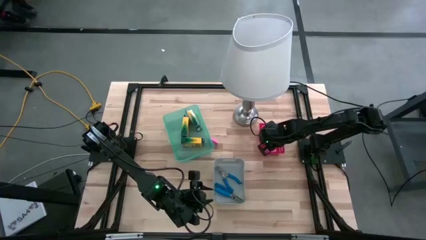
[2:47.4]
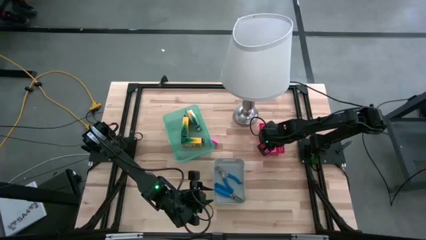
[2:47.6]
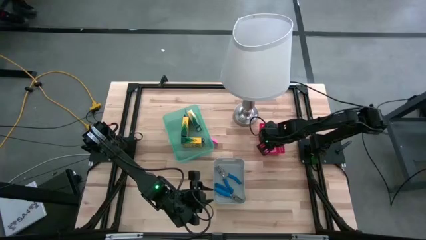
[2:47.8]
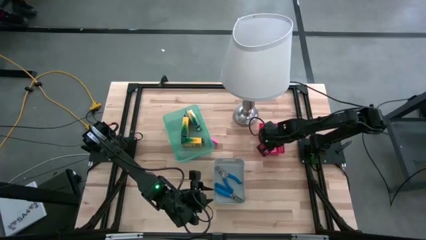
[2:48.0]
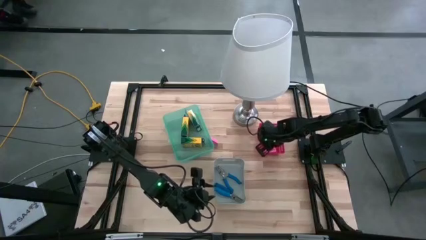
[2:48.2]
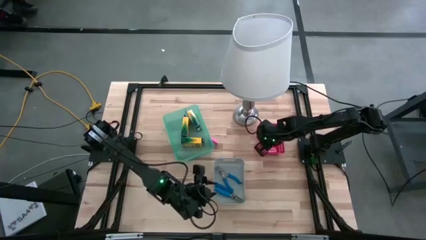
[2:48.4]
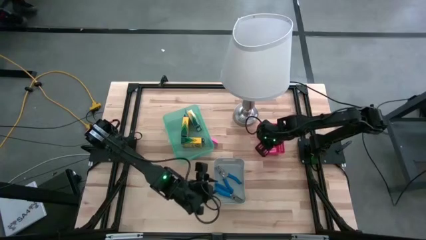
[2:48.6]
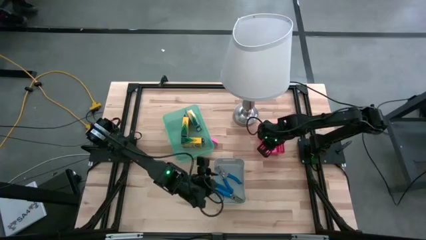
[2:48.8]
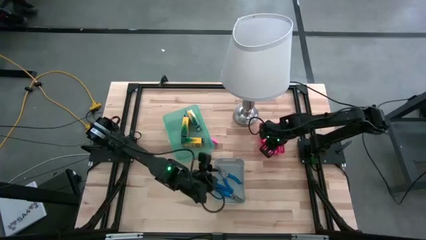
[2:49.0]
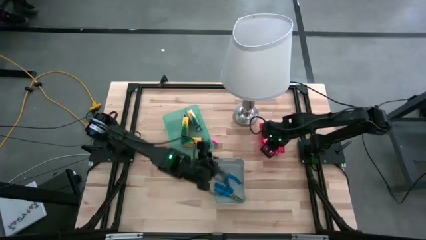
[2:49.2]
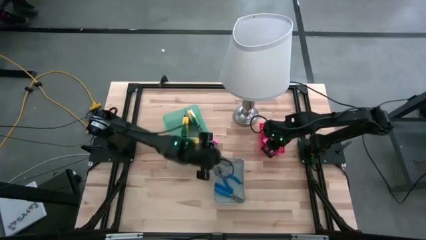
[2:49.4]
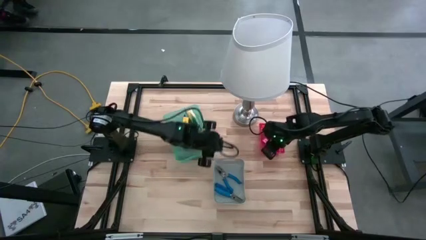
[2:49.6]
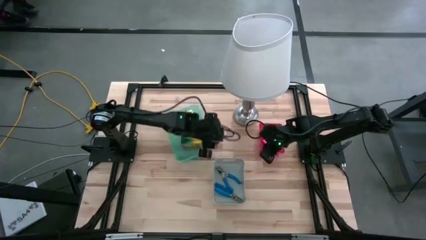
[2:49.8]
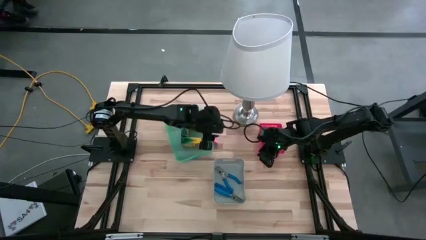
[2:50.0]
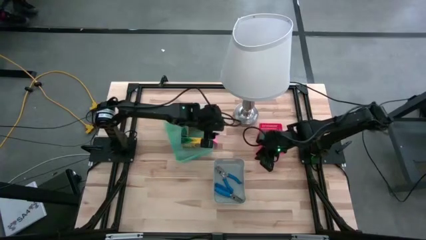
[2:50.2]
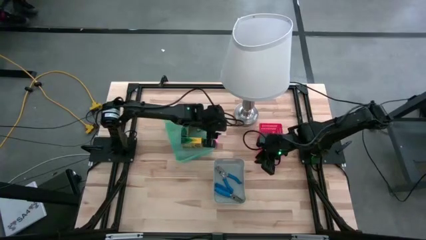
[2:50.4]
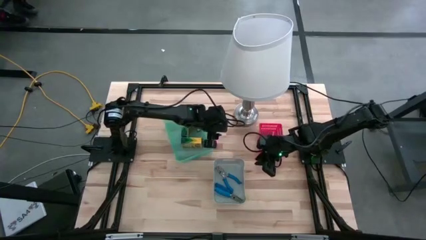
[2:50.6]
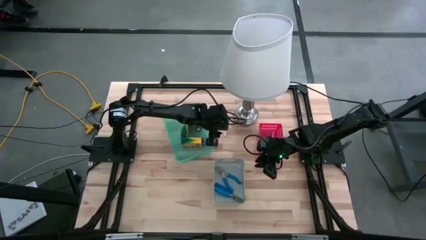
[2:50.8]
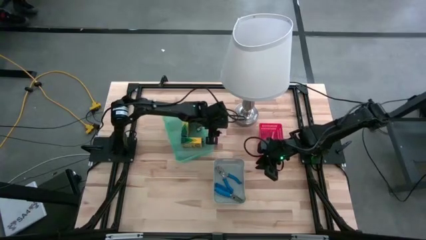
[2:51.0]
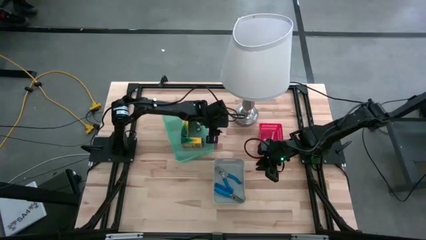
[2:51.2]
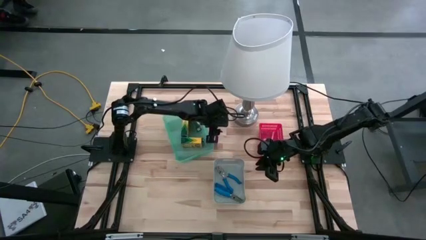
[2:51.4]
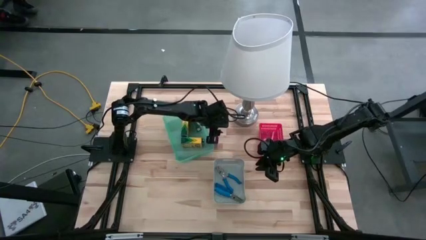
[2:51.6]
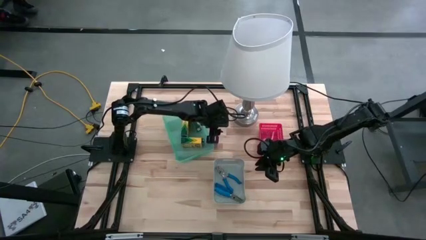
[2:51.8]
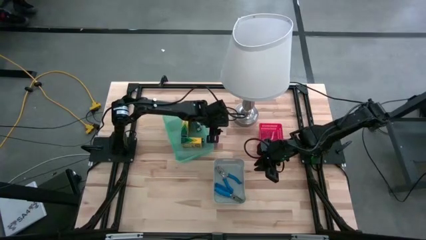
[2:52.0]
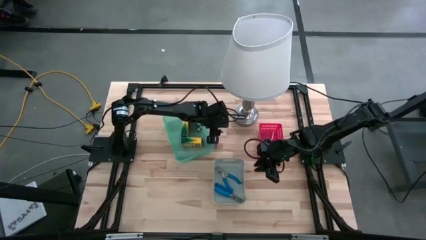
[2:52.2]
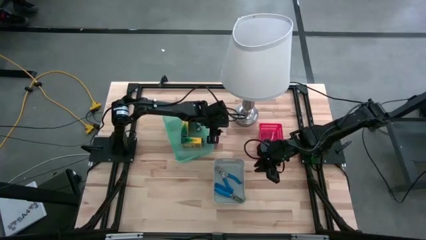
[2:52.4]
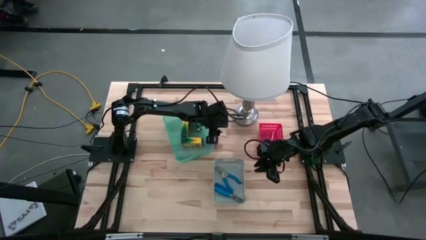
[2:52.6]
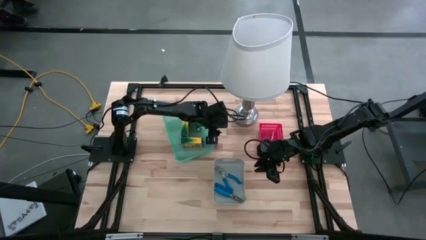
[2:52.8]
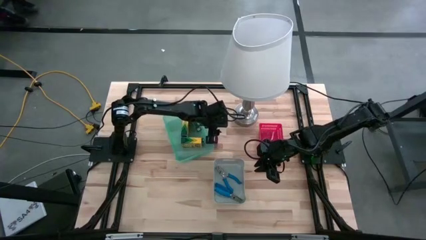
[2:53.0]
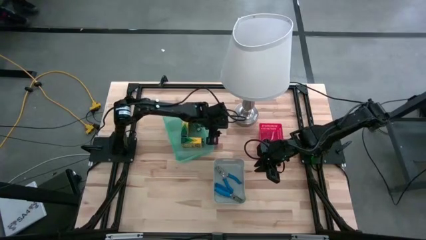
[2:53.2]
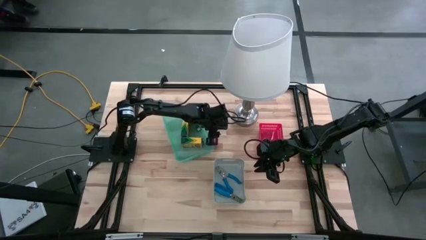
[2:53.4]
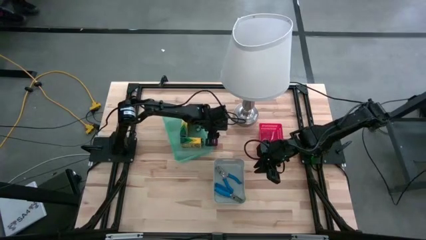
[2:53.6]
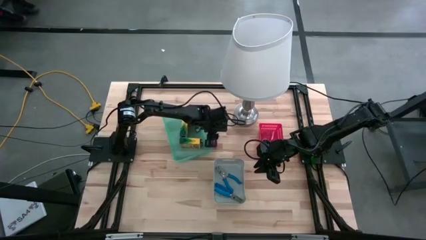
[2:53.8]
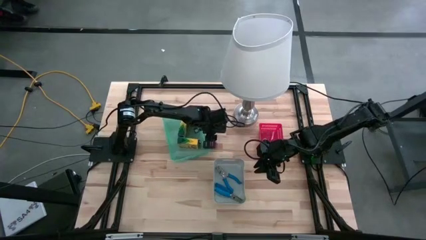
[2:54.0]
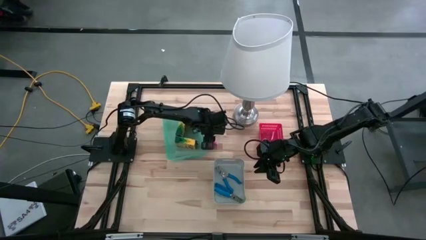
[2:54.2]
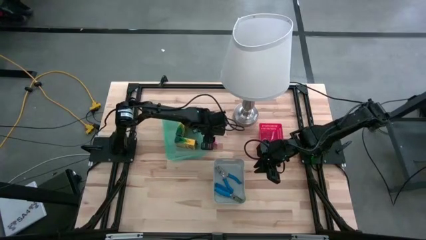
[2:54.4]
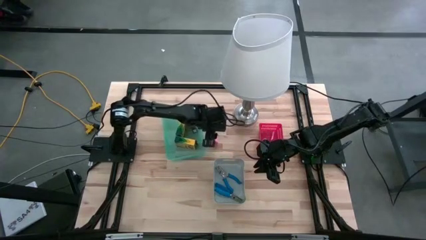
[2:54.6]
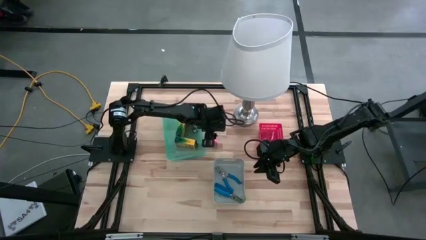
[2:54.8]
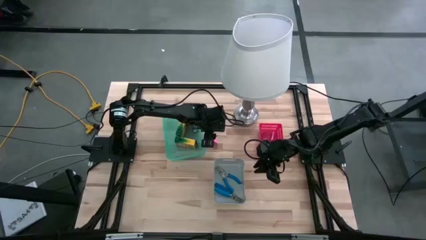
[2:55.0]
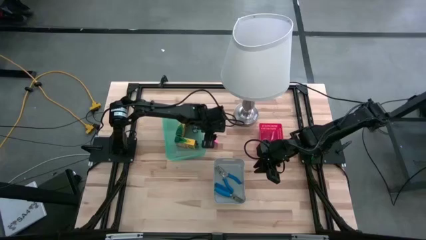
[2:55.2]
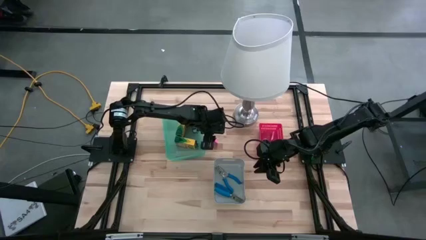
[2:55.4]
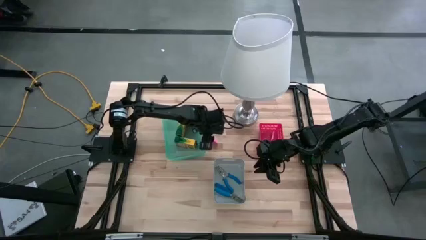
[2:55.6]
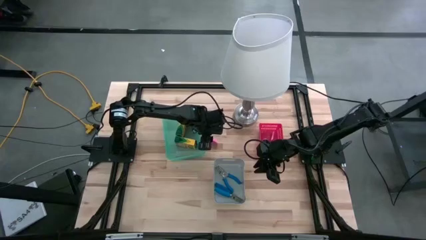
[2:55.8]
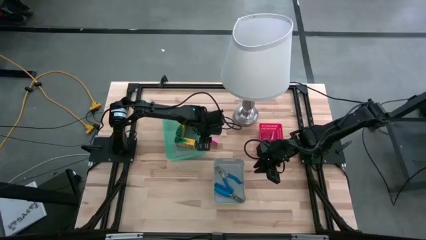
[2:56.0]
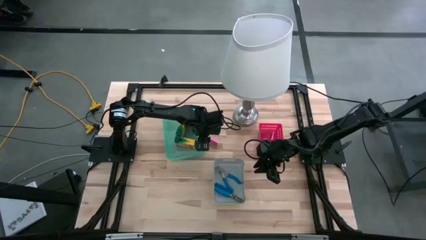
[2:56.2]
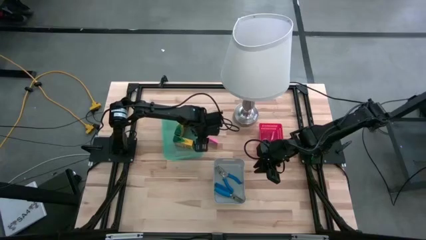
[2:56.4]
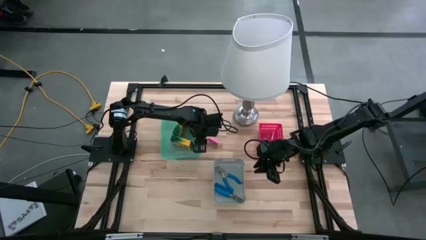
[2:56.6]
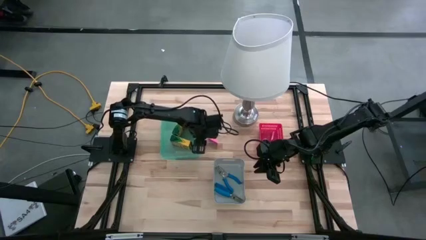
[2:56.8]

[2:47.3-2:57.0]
Task: Pick & Place School Supplies
Put the pink eraser into the red bin

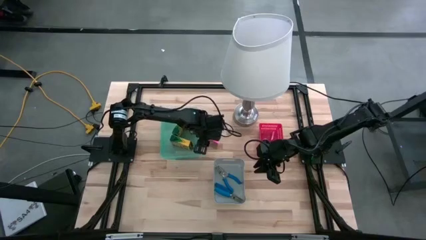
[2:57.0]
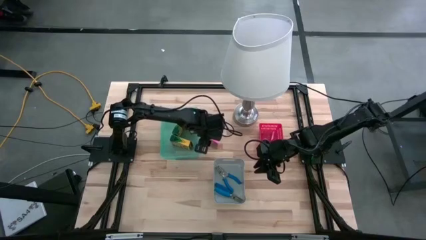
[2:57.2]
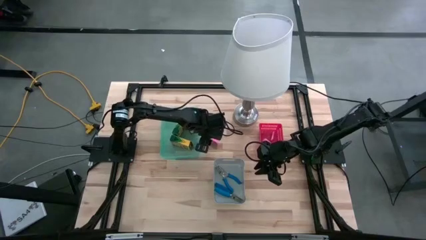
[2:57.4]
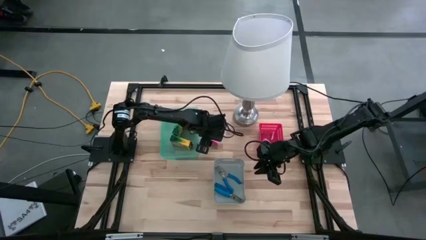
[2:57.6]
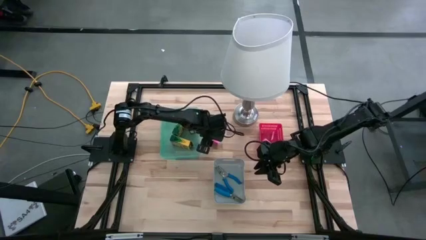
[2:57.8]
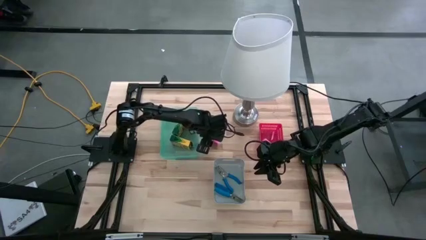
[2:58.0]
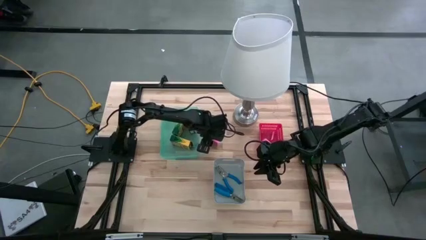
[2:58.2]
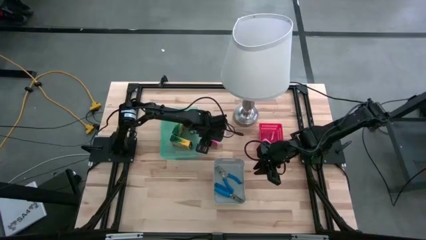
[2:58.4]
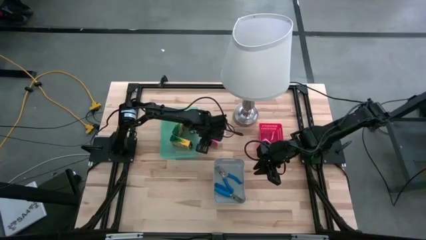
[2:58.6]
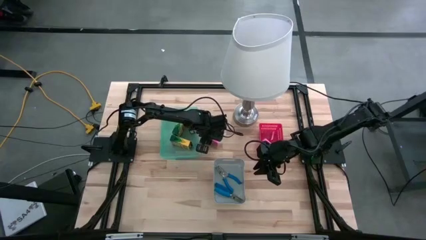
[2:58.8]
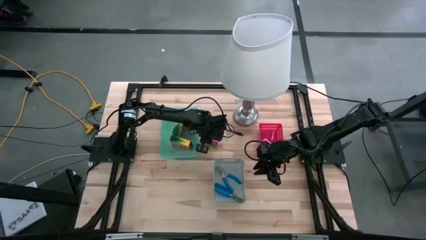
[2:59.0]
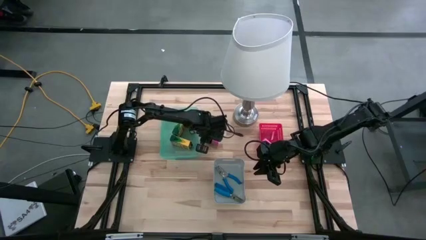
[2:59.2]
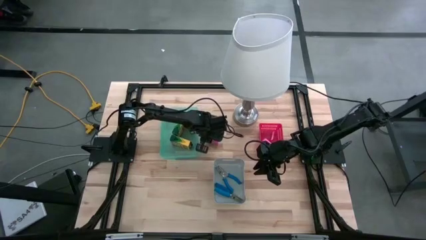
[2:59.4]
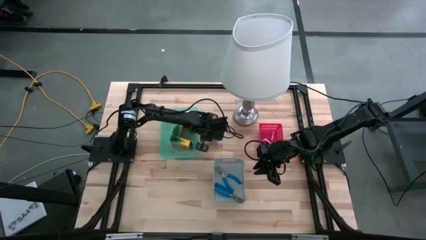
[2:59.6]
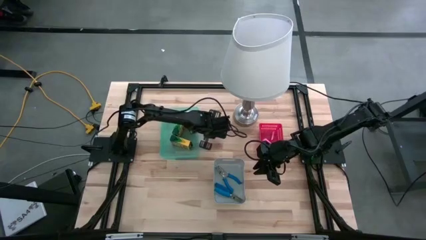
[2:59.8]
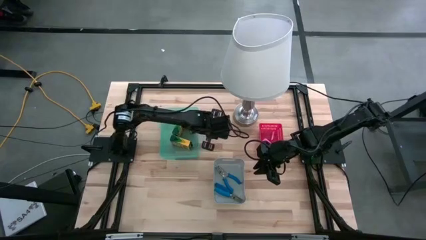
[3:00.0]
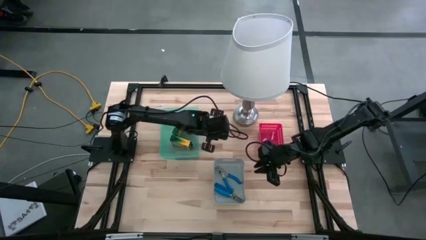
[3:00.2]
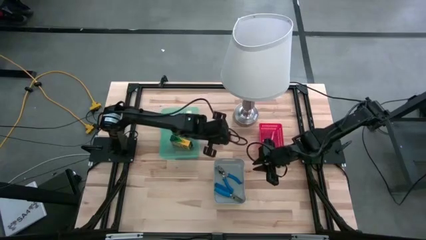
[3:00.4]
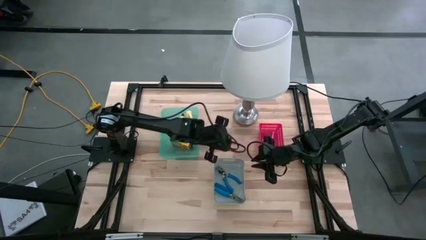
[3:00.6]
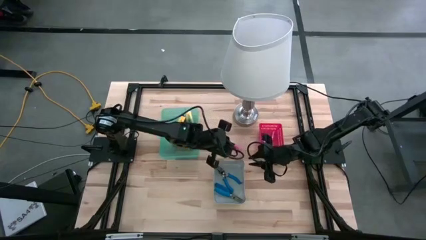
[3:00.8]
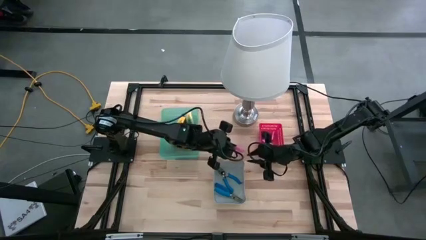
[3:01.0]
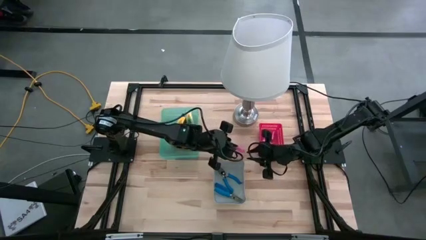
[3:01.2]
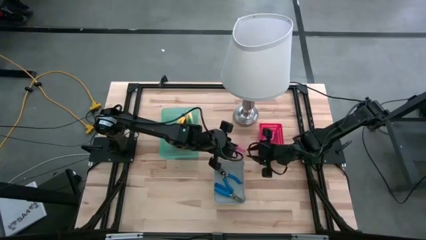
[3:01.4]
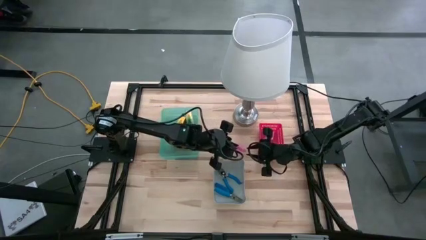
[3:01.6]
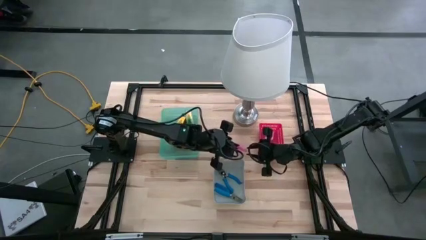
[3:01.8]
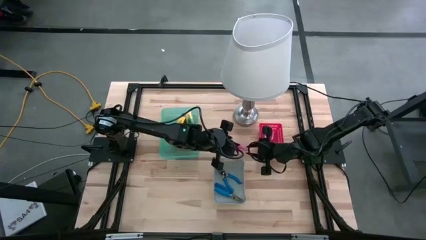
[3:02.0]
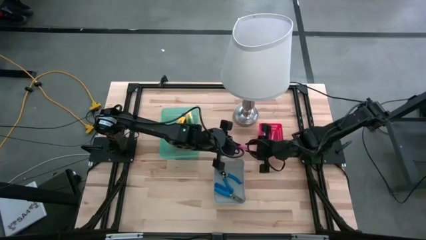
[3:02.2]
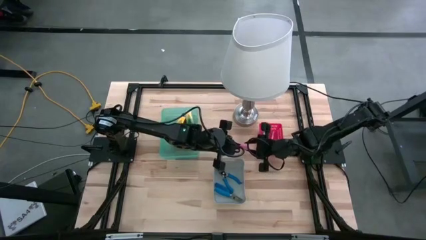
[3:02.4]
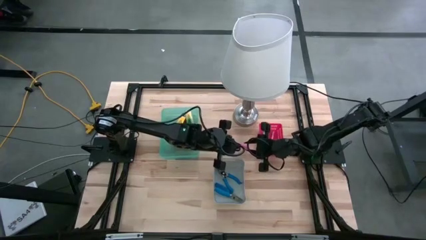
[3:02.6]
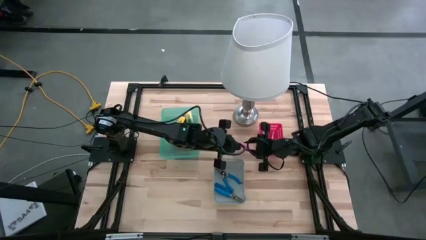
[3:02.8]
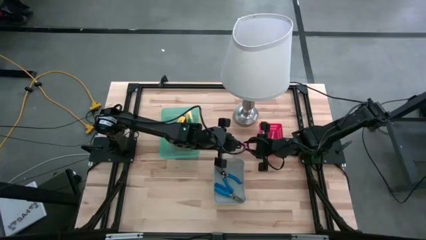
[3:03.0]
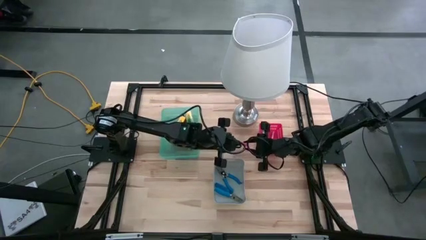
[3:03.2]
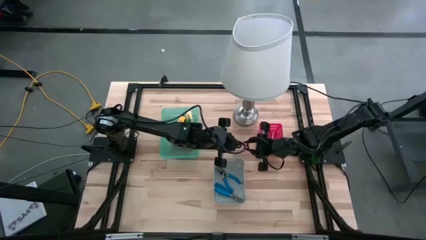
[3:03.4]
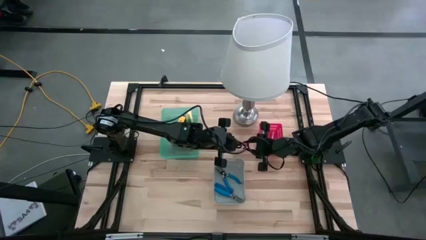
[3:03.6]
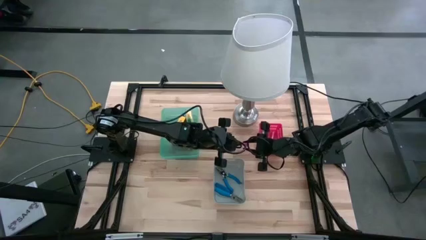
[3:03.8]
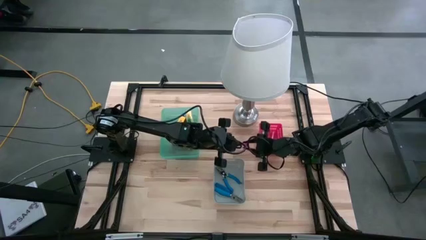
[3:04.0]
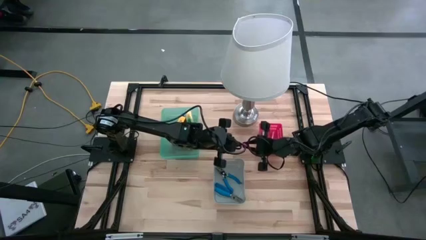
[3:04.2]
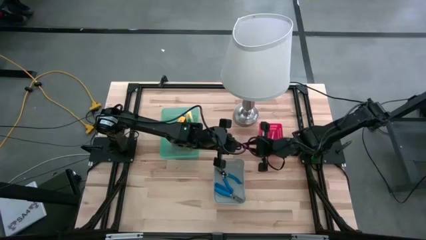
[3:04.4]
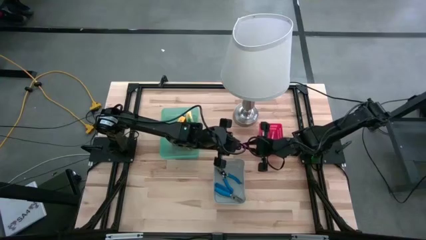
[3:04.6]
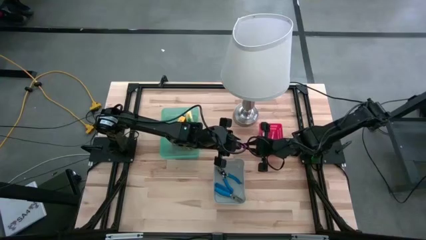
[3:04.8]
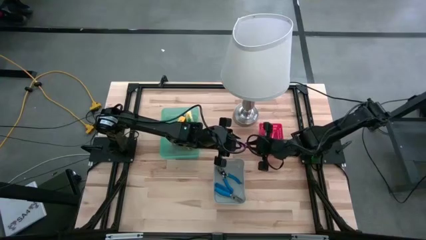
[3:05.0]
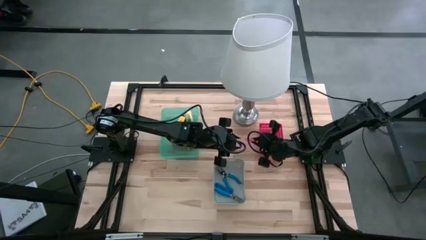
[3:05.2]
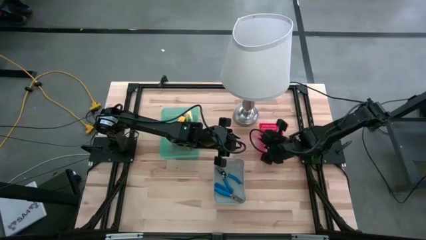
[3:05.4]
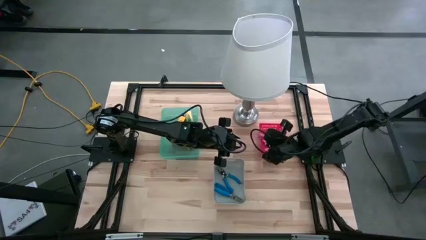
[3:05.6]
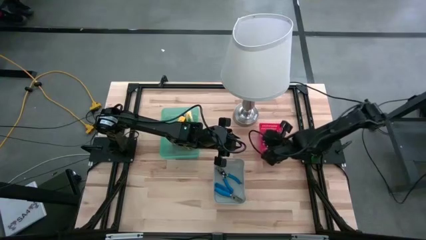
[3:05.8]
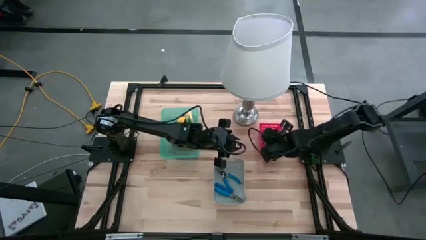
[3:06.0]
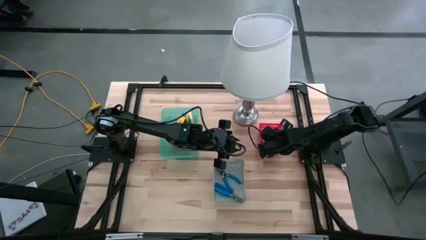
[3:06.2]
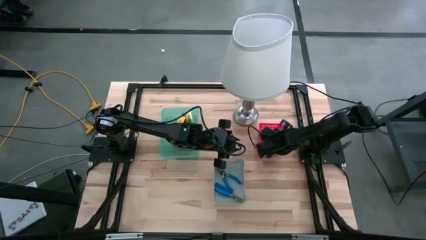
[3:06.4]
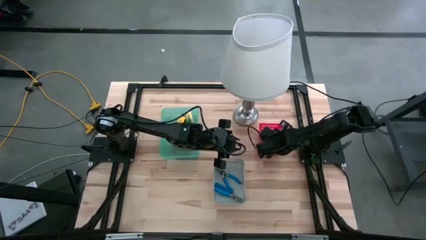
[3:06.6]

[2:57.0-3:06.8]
Put the pink eraser into the red bin
